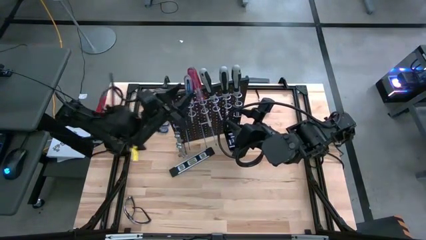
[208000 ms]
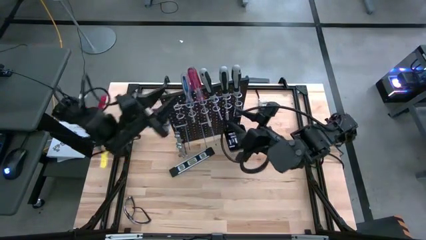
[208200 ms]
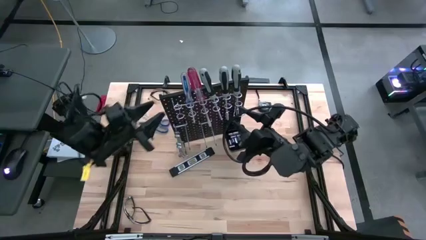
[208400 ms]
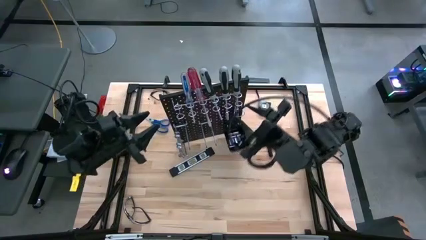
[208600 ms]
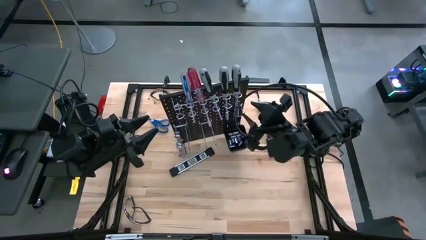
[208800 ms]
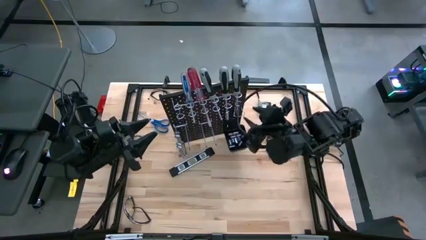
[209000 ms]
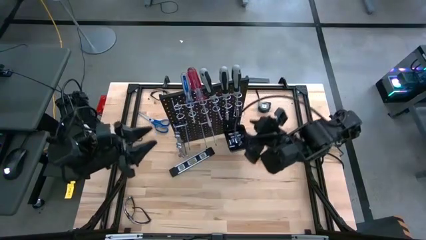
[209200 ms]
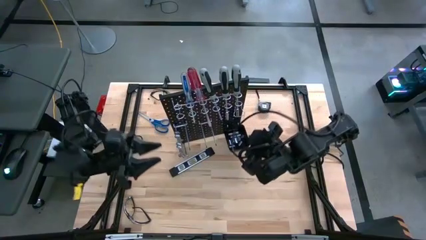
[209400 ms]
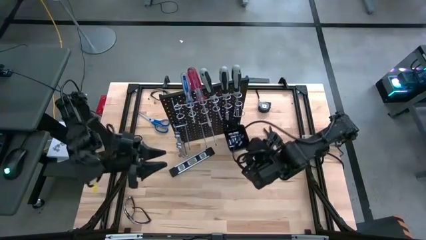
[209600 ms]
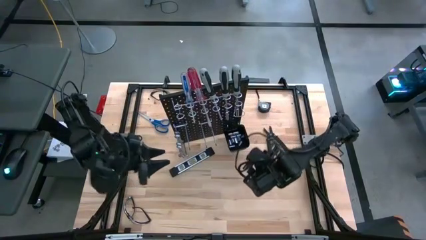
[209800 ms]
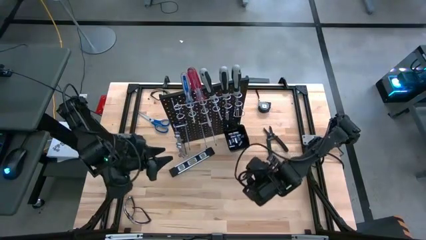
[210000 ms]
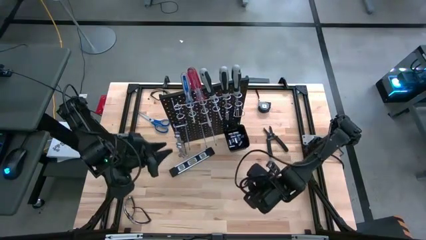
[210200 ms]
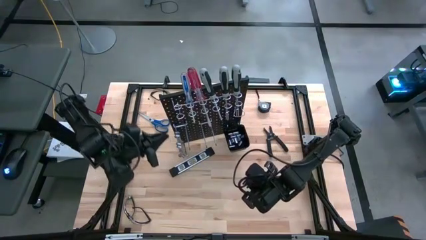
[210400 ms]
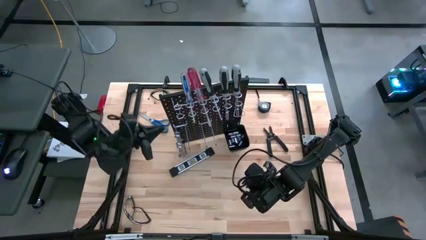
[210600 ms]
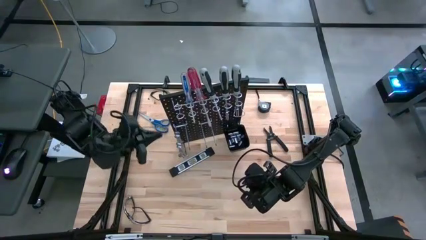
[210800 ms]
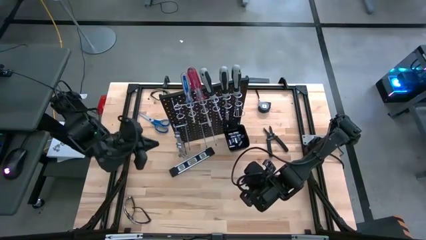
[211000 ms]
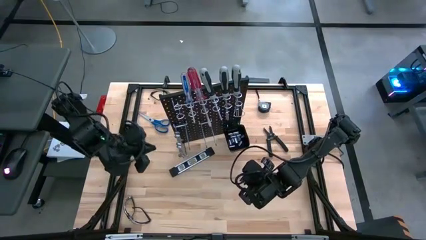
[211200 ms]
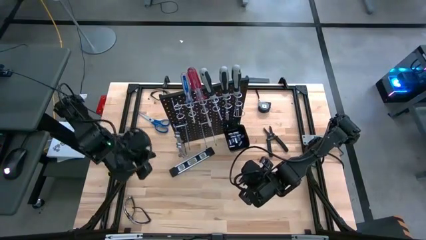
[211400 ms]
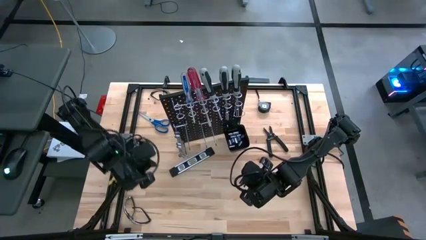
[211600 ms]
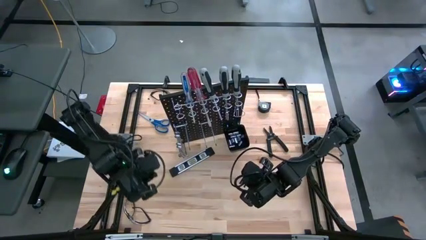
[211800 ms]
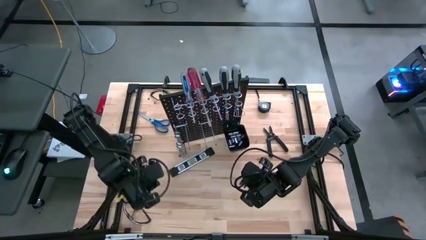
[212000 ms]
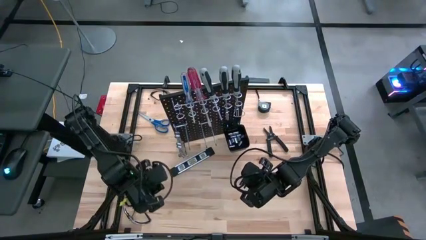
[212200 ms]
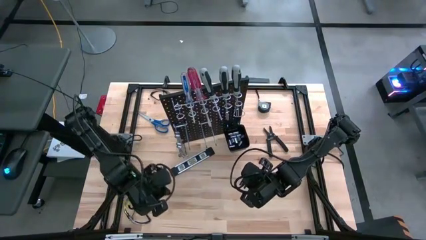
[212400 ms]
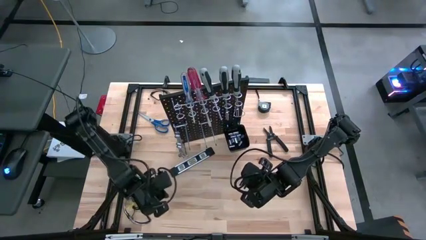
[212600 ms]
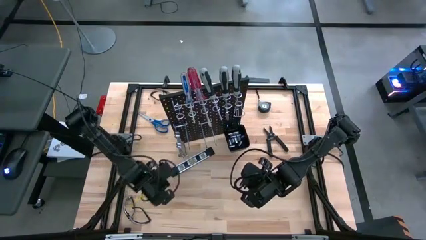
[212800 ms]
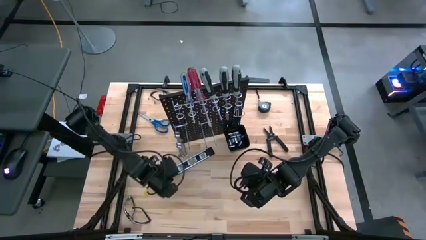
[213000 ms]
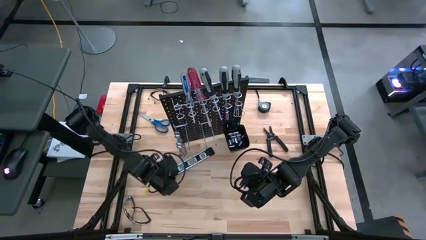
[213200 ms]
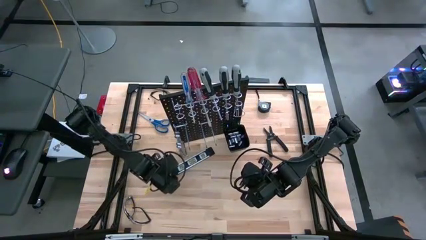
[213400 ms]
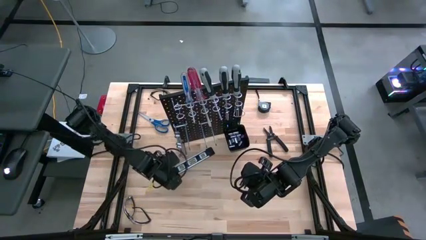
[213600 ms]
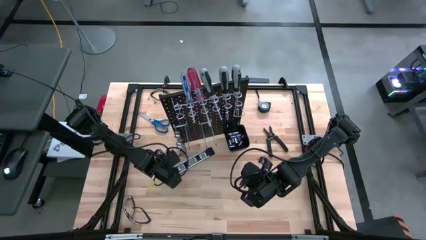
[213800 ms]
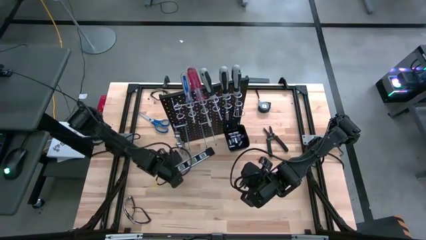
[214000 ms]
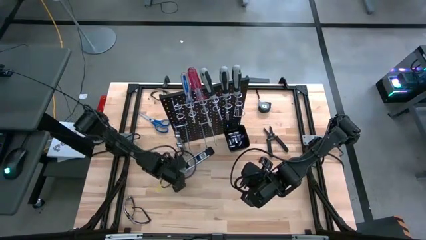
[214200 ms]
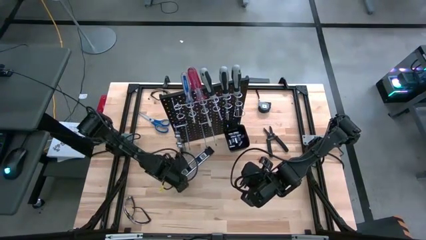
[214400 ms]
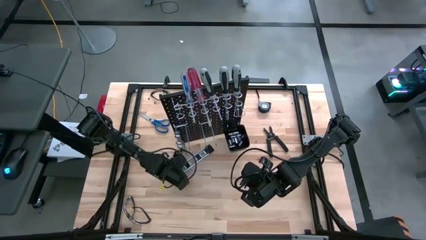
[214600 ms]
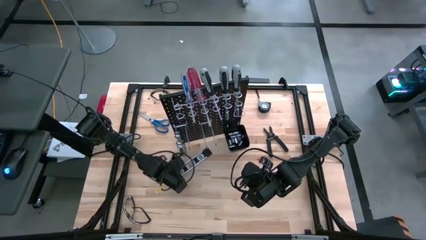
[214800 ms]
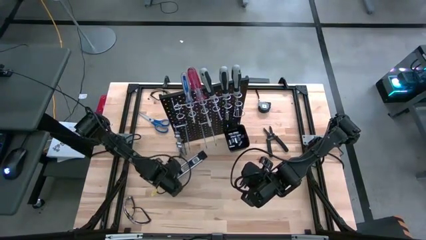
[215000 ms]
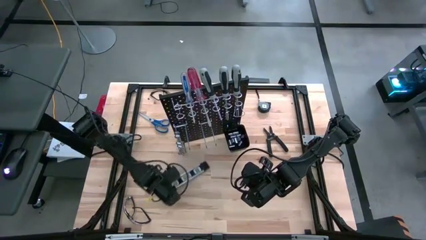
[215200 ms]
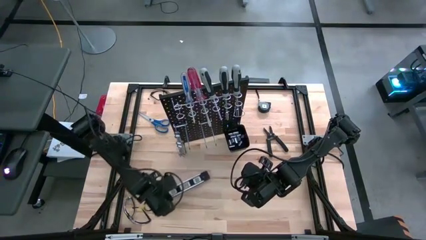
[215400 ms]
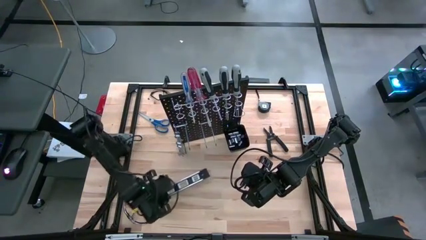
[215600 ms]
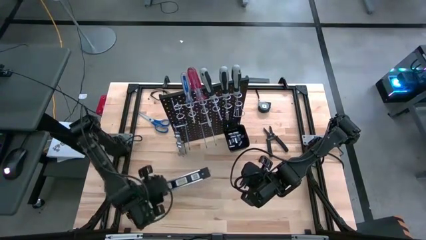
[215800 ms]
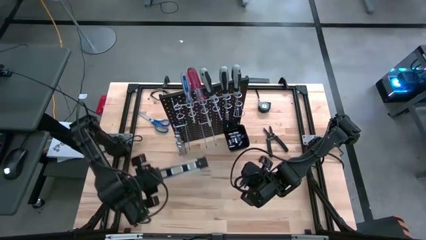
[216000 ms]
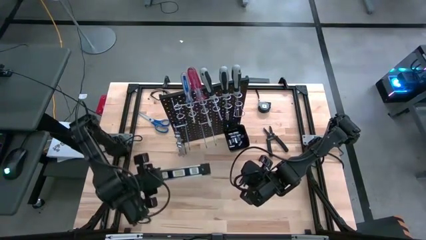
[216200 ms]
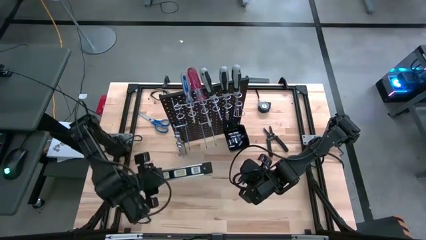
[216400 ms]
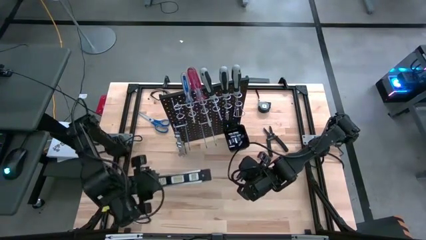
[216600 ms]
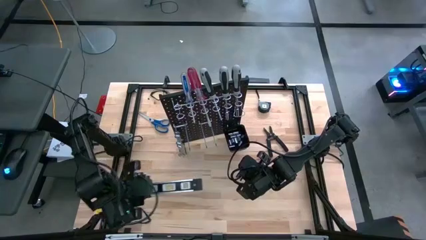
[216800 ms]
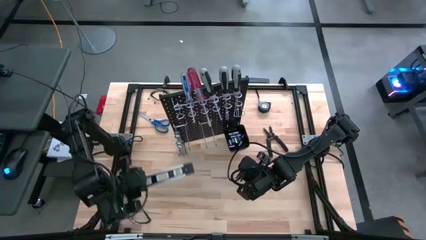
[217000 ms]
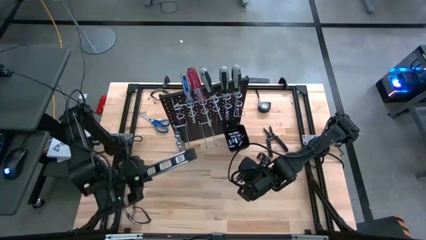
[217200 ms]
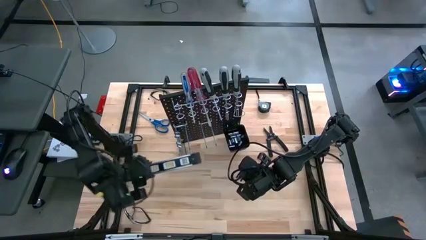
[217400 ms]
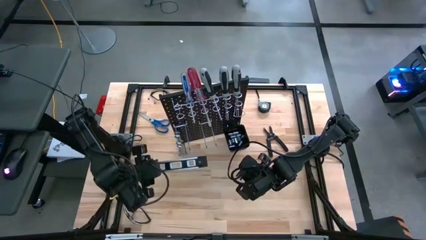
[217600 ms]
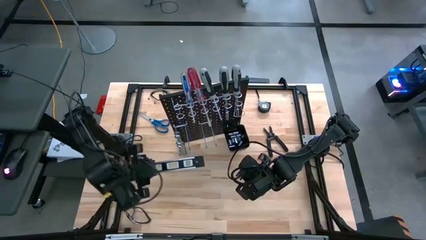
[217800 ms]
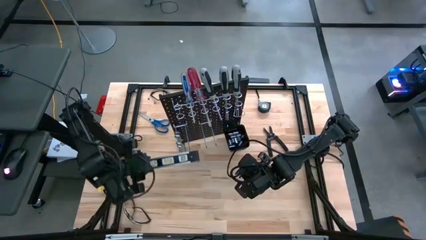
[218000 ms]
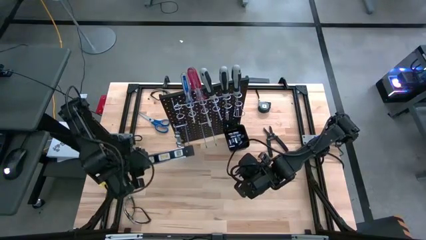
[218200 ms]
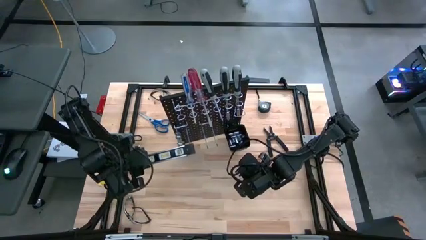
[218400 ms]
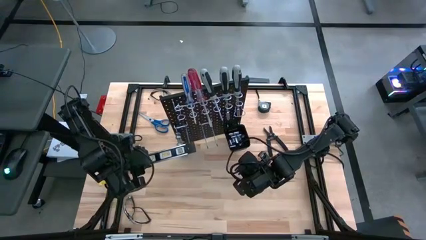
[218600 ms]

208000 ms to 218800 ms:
Task: Hang tools onto peg board
Hang the black spirit level on the pegboard

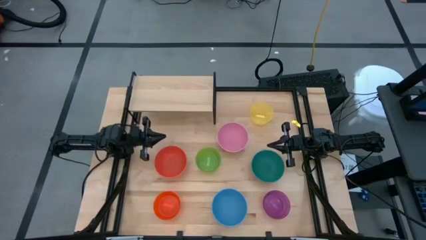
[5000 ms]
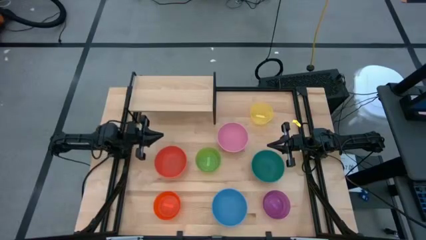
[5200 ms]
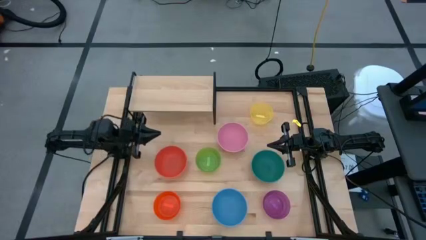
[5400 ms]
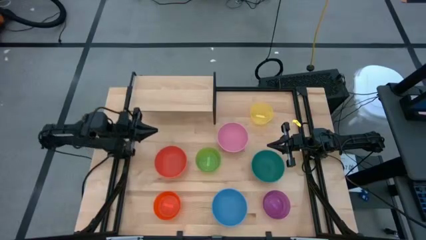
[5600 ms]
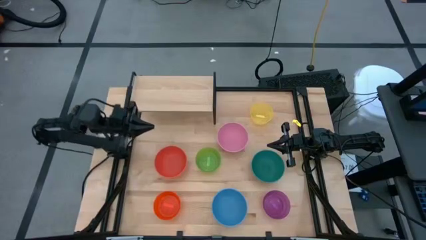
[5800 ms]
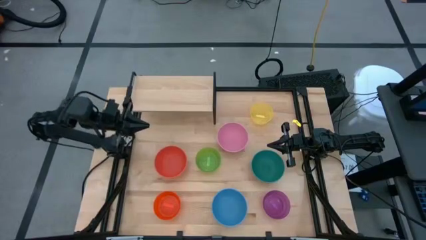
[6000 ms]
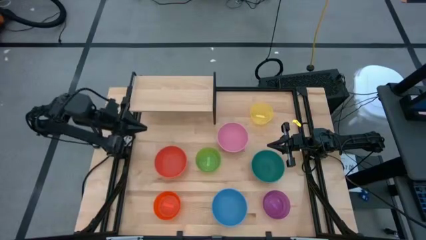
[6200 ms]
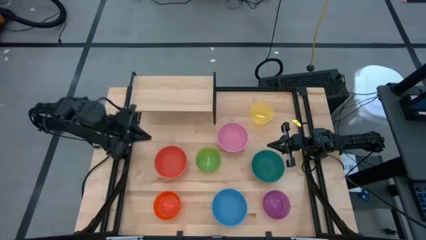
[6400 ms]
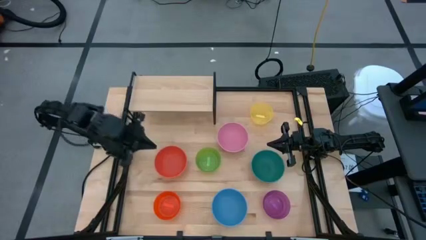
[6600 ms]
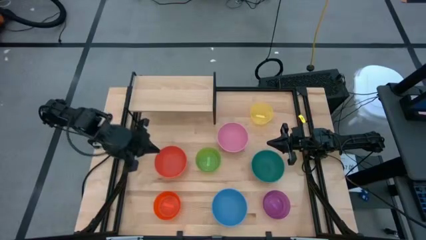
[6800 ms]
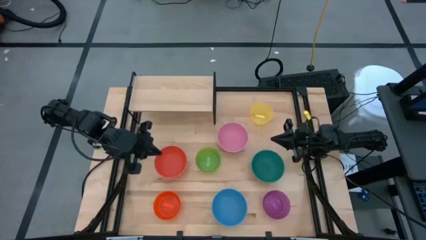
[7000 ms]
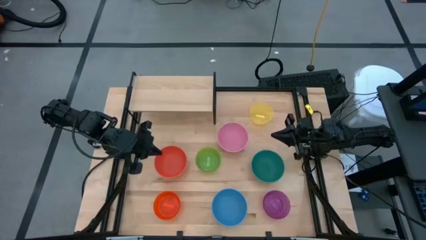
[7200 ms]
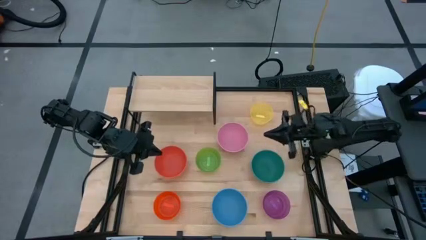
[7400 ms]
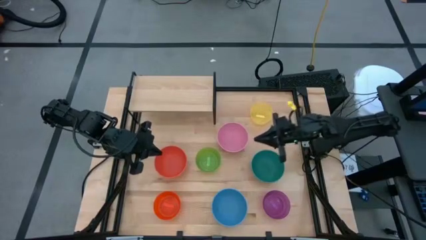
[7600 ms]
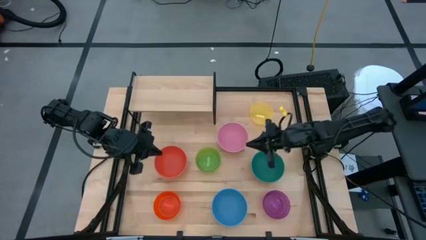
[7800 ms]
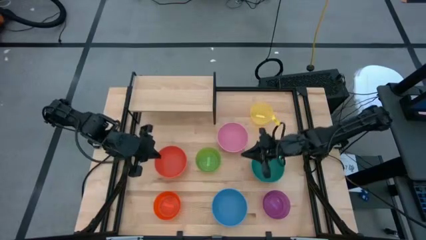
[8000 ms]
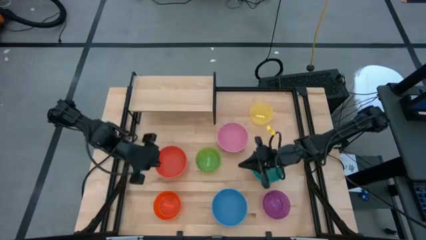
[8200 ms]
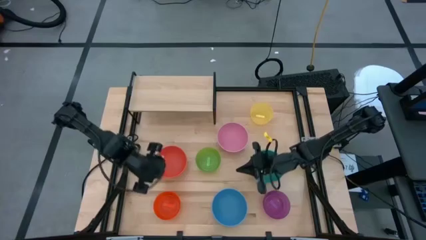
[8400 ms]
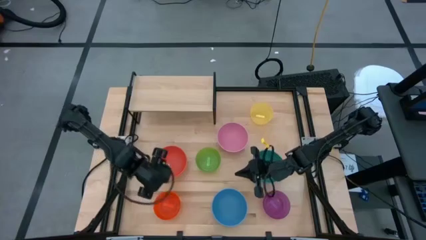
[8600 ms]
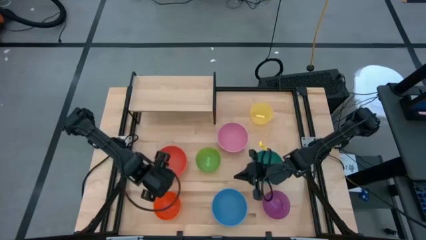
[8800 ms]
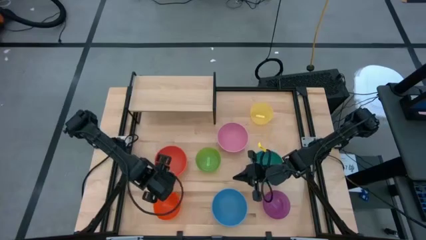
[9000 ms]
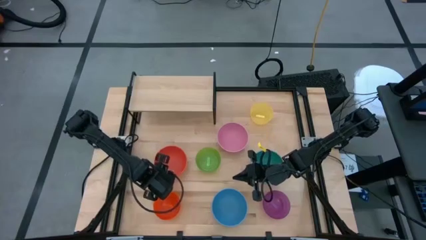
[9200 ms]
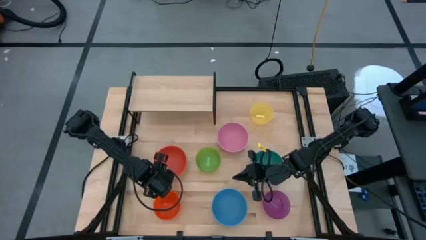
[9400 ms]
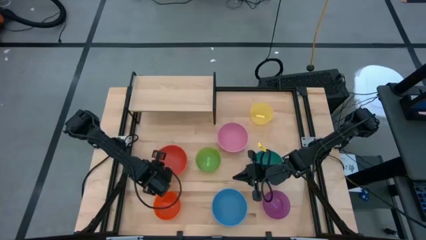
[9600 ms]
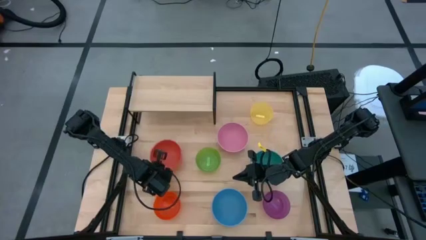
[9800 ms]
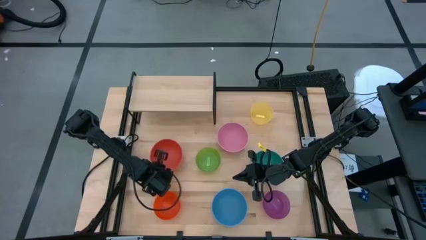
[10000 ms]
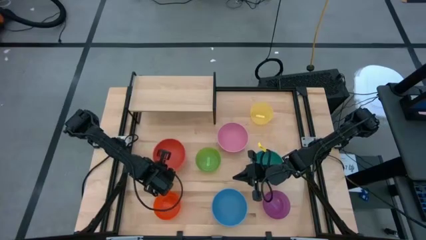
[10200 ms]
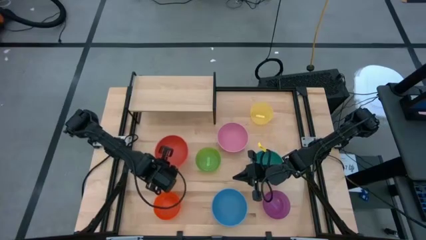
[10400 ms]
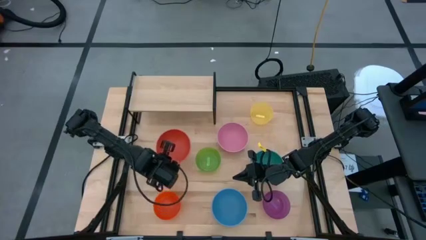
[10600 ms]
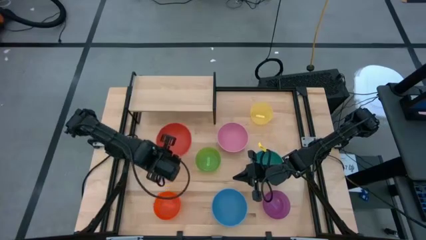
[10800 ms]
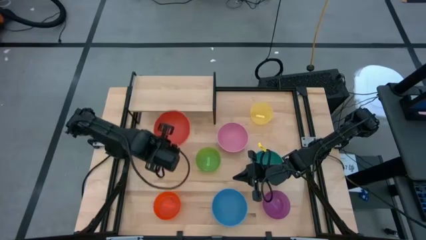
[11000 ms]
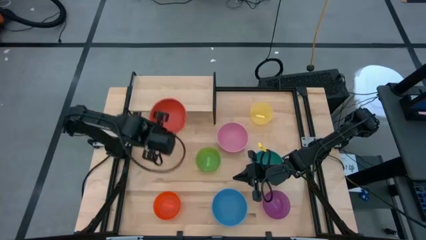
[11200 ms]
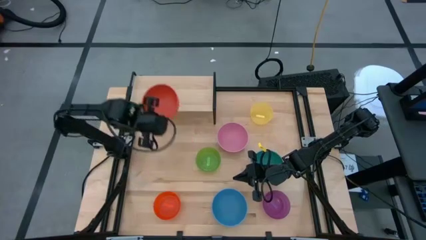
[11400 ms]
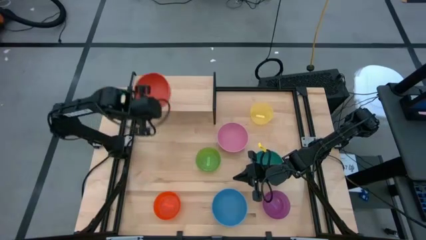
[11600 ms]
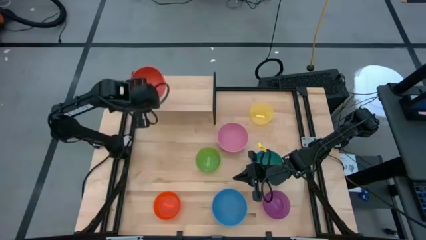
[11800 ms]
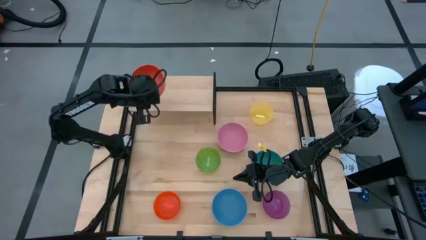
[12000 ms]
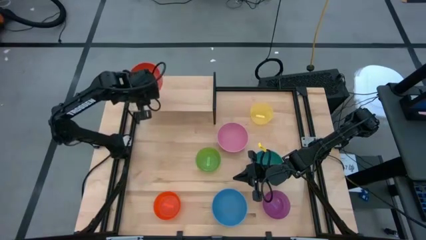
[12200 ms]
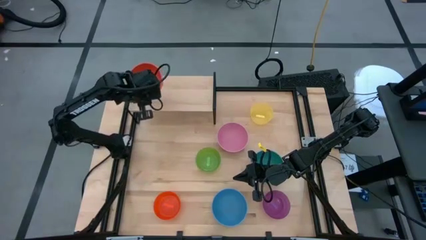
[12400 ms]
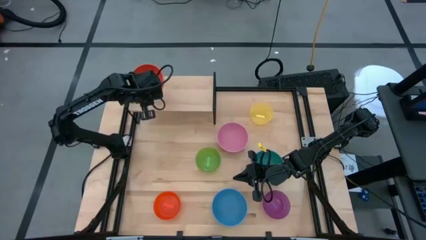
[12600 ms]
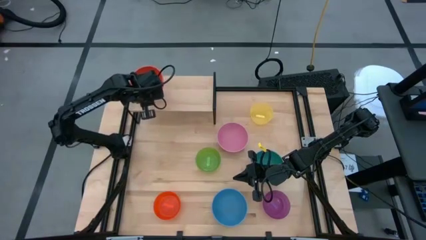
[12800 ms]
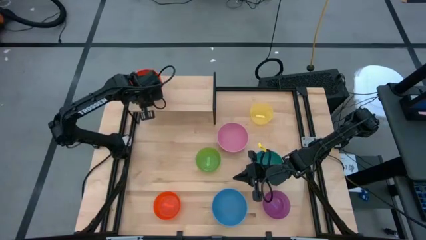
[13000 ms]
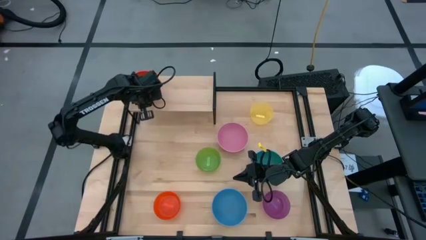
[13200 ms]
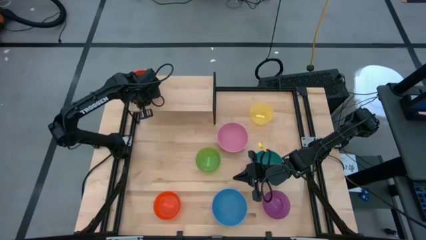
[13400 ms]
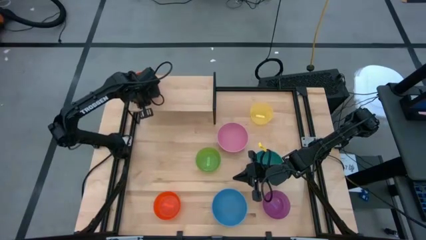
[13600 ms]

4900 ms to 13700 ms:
Task: Place and stack bowls onto a shelf
Put the top orange bowl on the shelf
